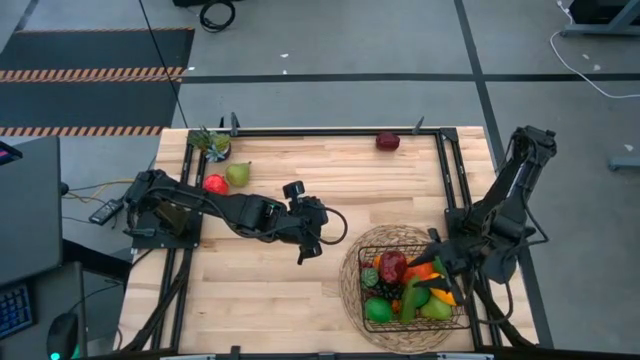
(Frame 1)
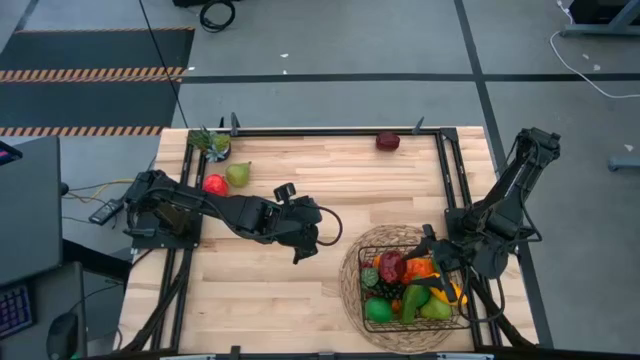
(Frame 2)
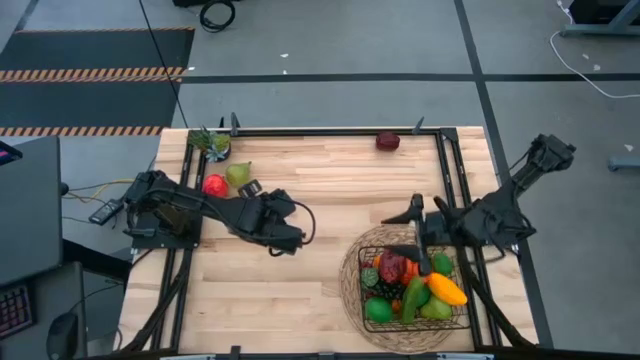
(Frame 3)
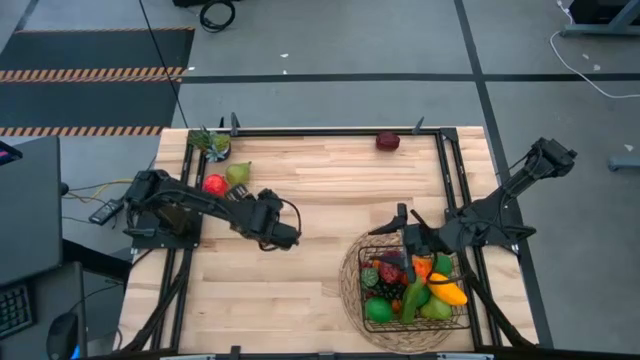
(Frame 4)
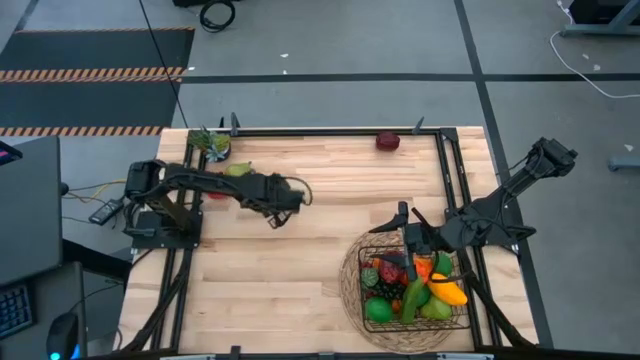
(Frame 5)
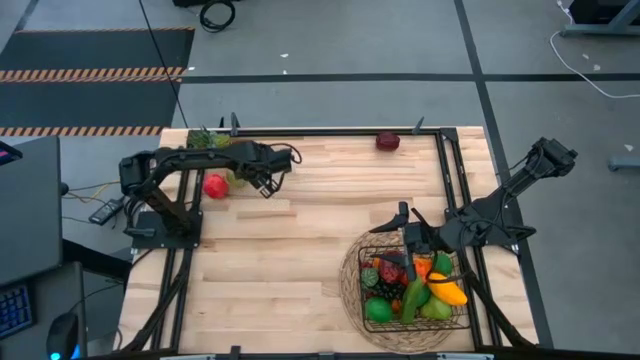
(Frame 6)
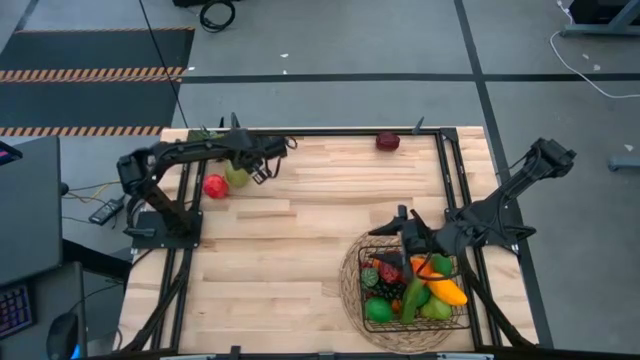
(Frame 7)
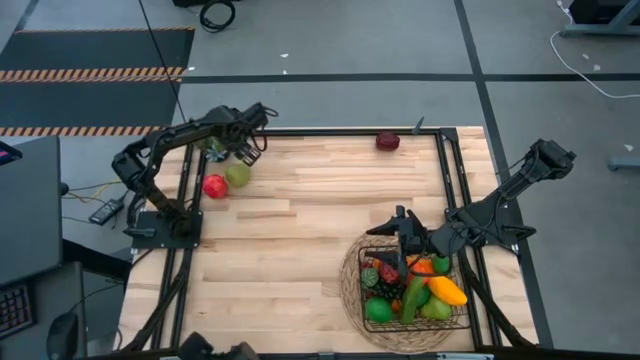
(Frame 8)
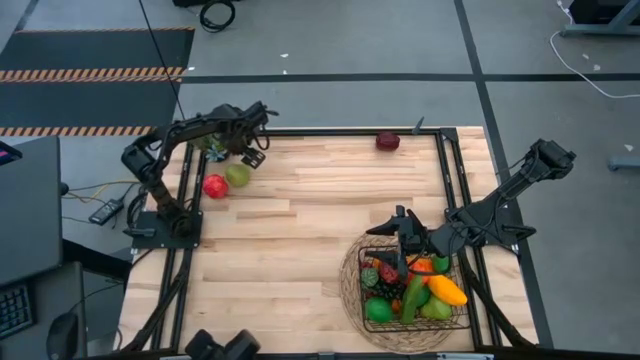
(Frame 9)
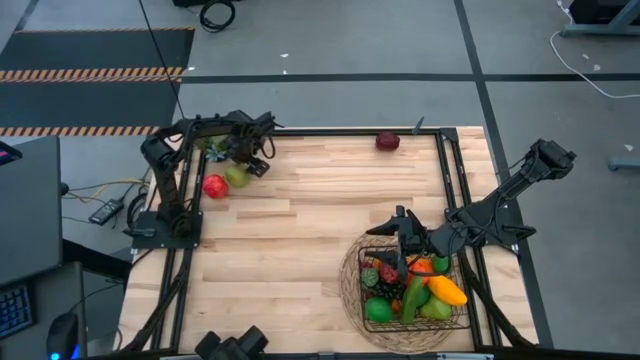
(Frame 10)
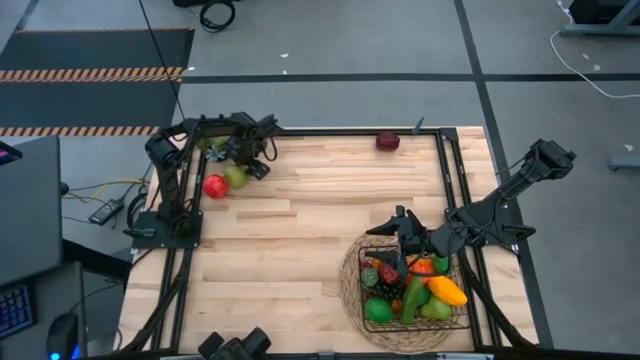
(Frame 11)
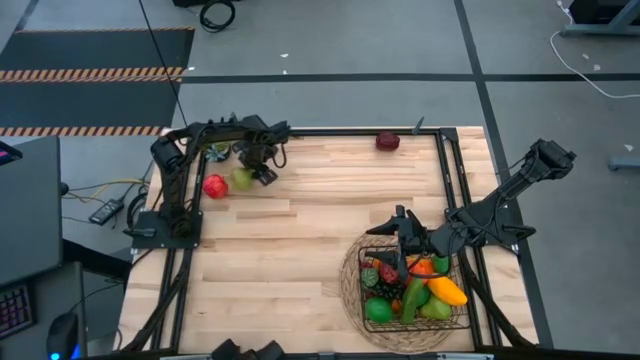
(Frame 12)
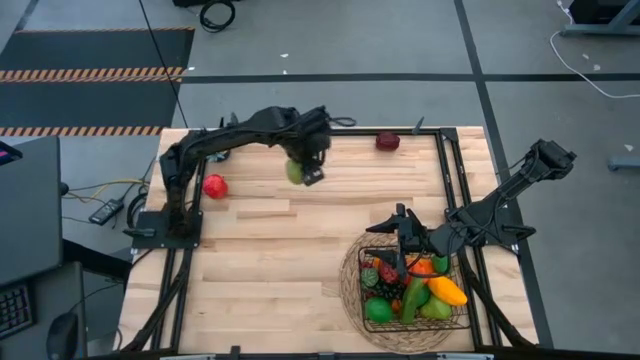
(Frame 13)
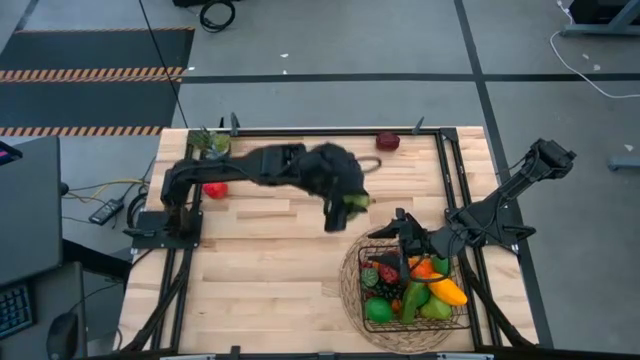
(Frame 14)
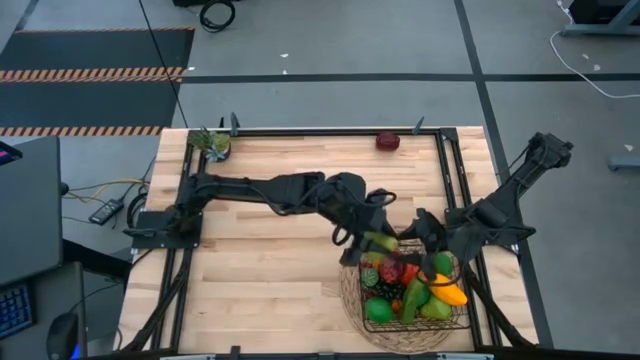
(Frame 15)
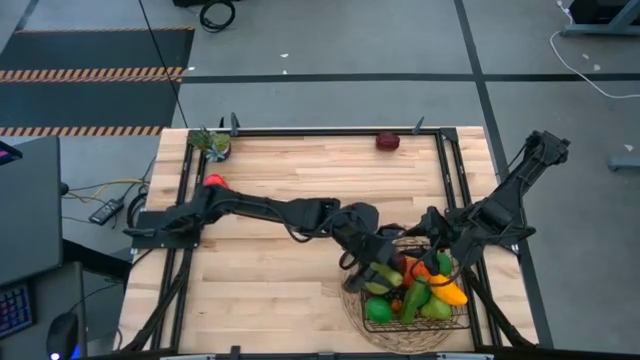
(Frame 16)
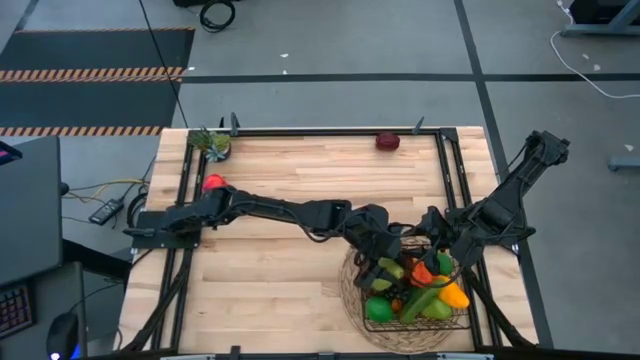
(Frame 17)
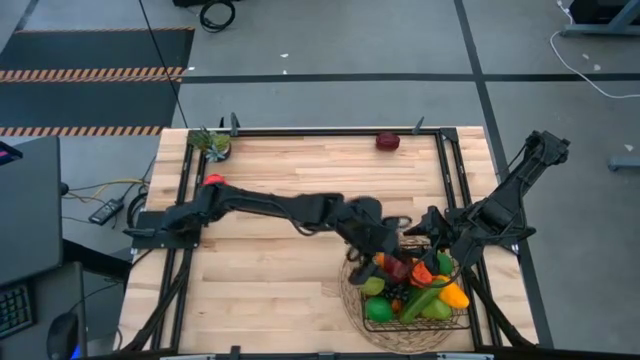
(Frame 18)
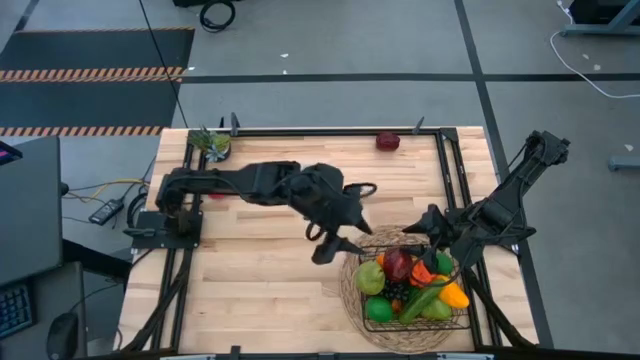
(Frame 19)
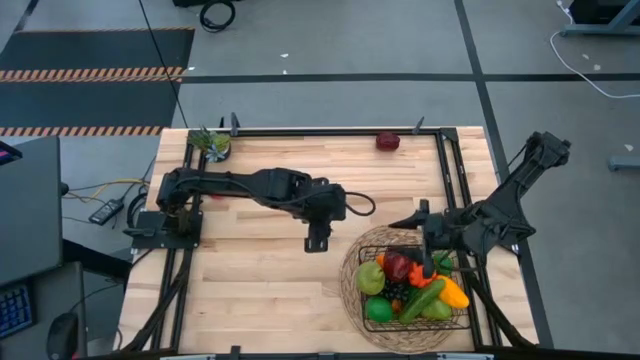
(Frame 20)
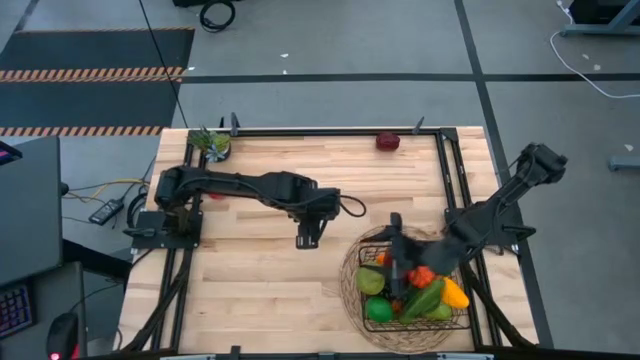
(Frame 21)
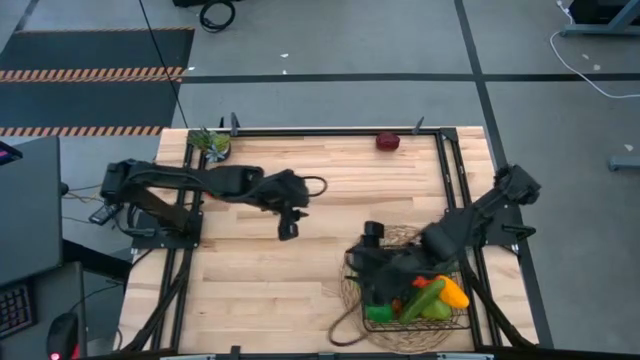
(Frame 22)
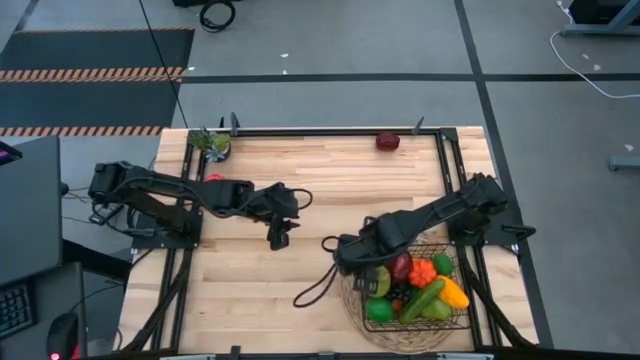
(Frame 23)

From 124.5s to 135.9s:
Task: Build produce basket
Put the green pear into the black wire basket

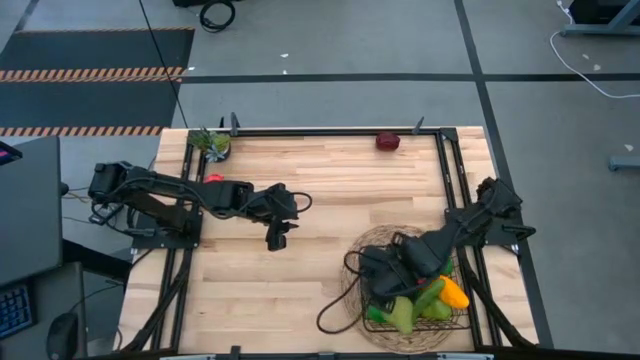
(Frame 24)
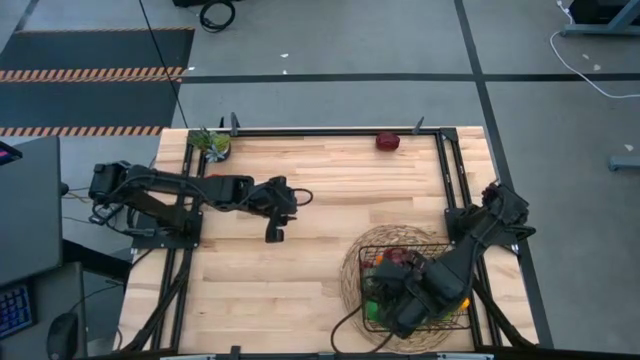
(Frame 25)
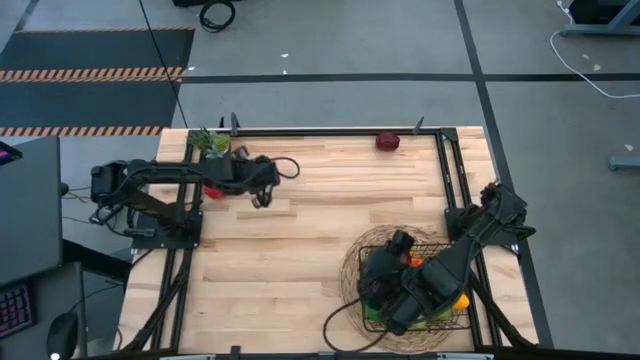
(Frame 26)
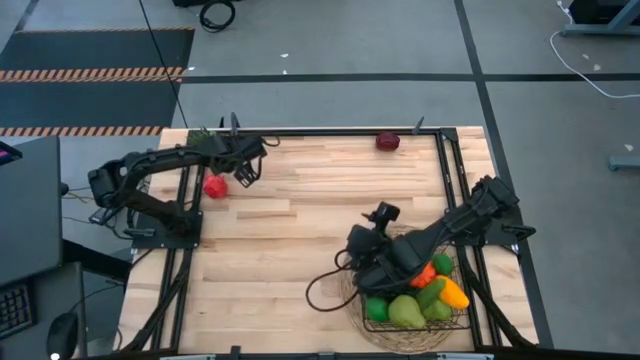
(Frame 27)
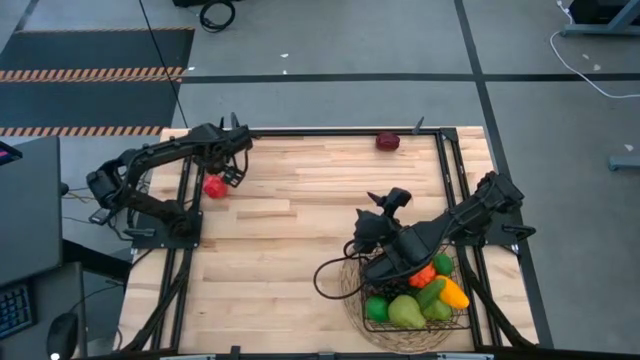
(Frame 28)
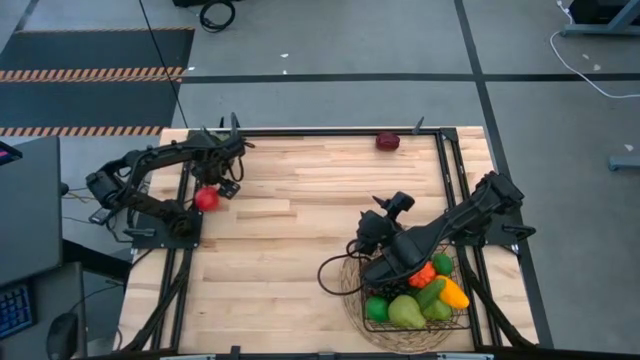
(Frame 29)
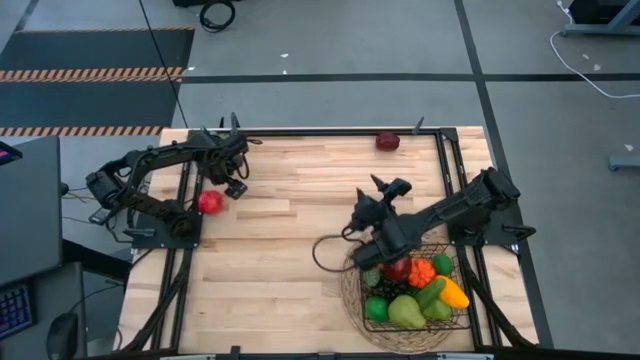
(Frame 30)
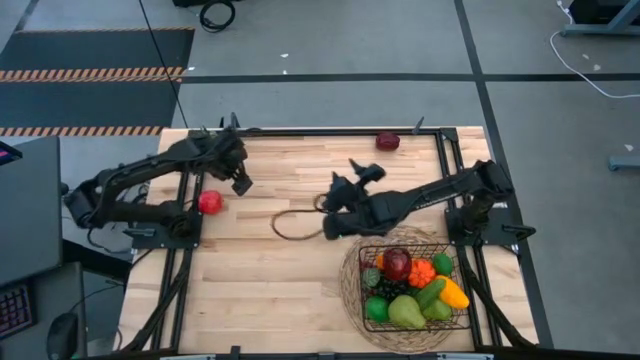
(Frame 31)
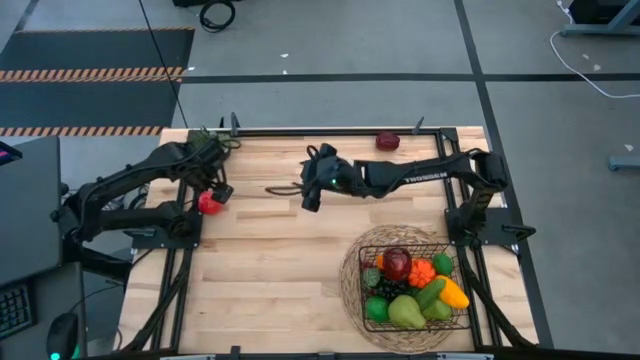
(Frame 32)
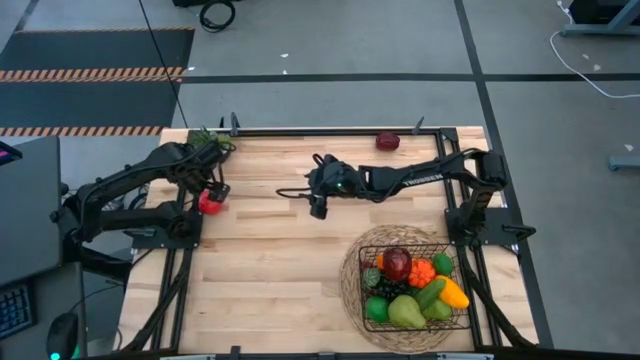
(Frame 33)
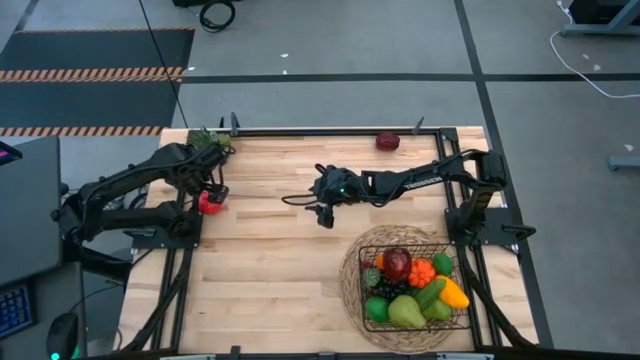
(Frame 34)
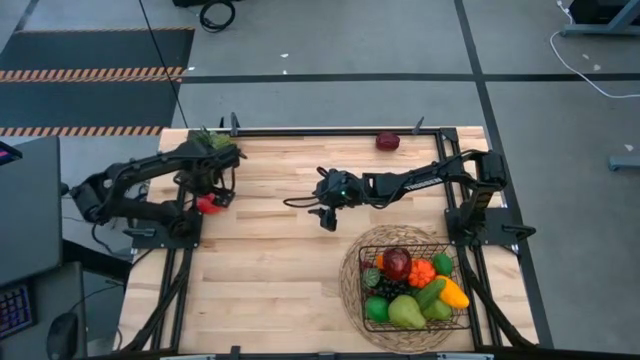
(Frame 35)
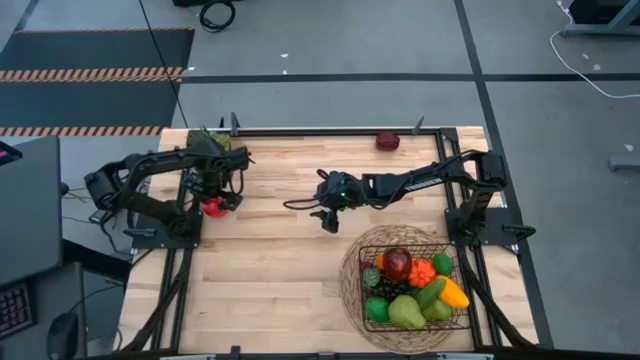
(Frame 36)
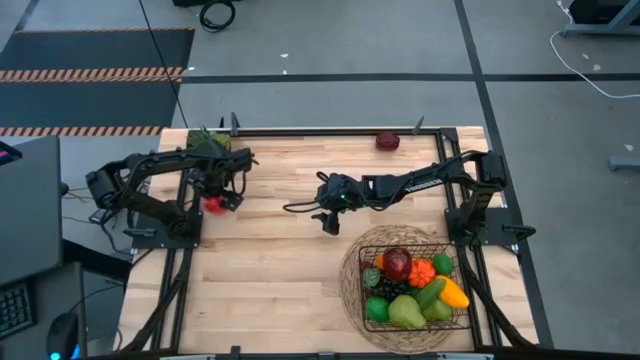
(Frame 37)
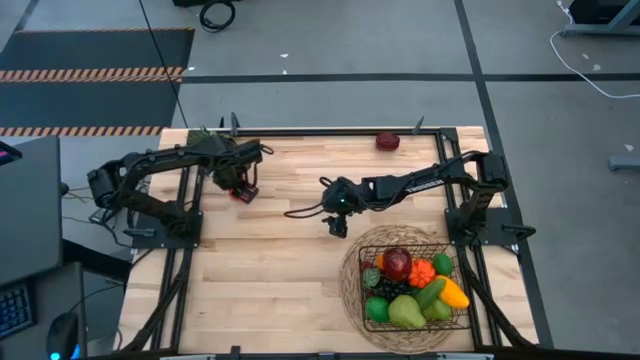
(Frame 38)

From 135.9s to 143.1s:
Put the red apple into the black wire basket

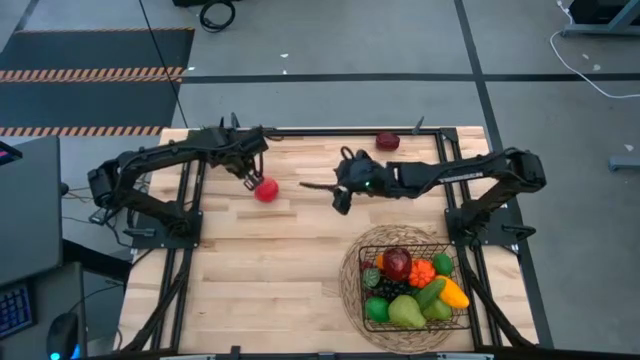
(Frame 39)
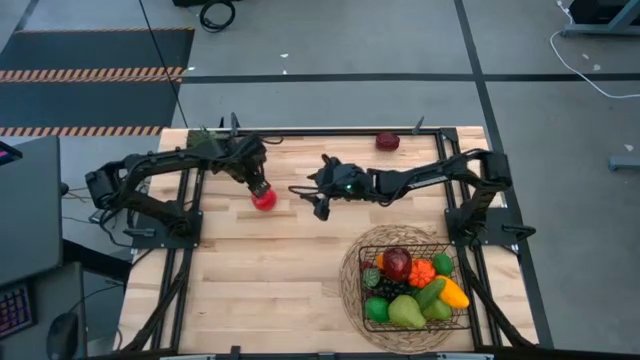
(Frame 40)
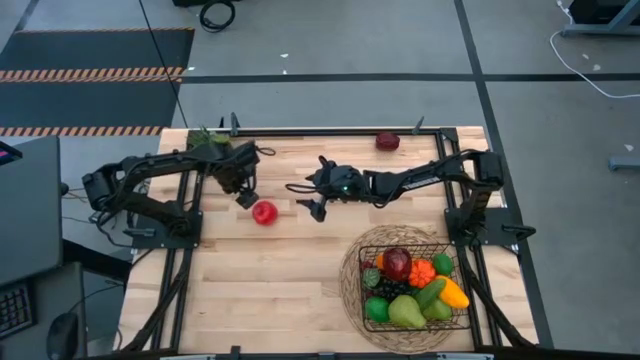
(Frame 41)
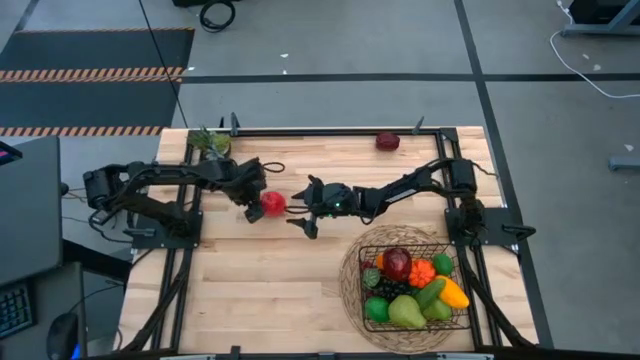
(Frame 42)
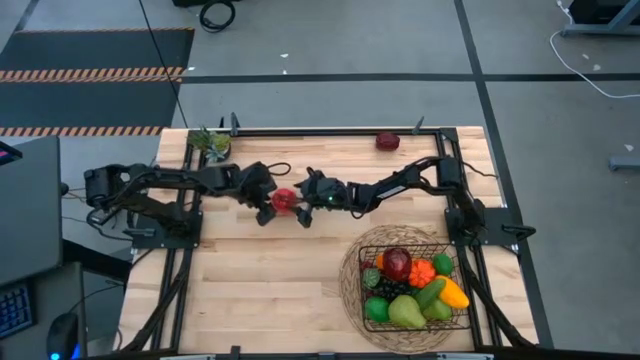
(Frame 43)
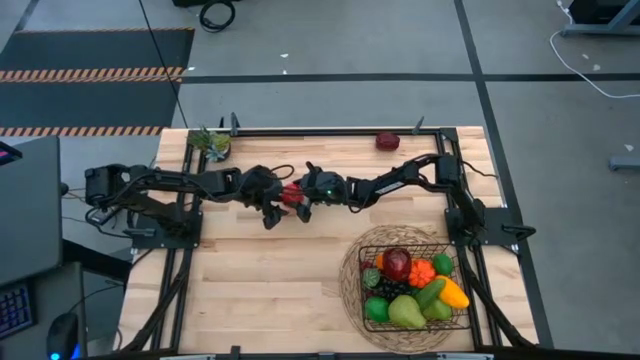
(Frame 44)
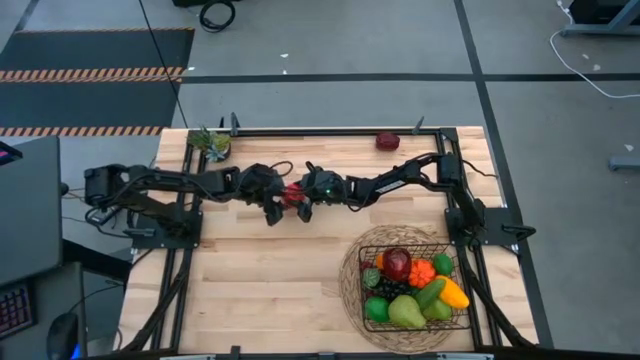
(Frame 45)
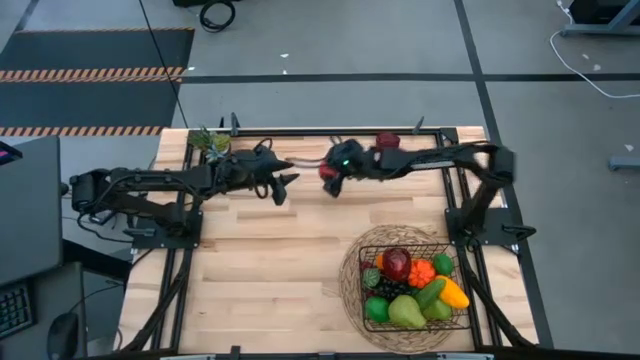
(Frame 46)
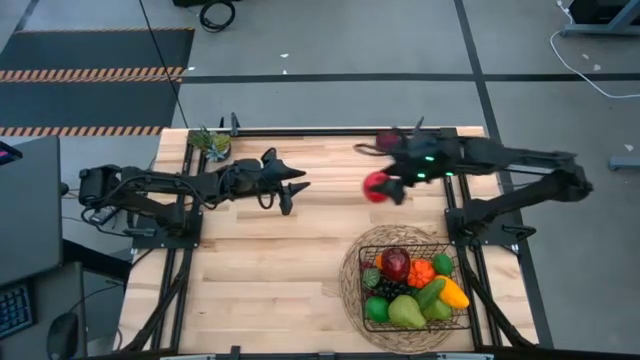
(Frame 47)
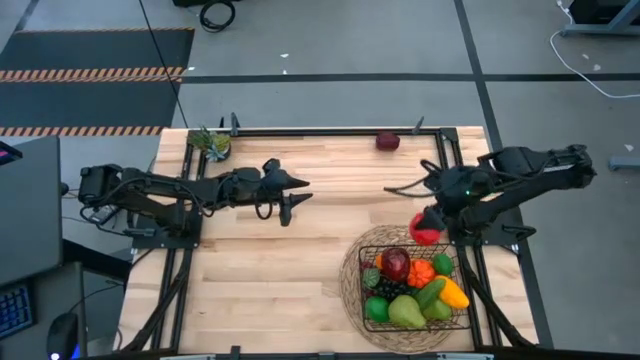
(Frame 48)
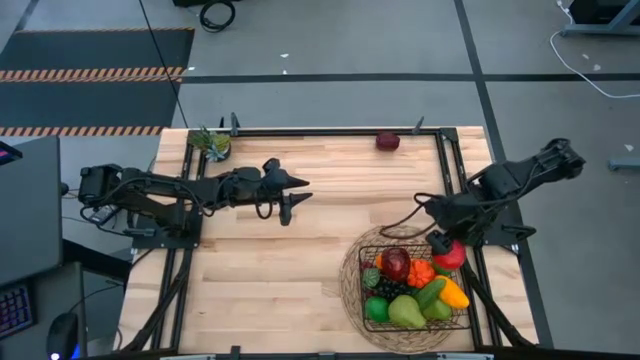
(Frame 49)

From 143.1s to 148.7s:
Put the red apple into the black wire basket
